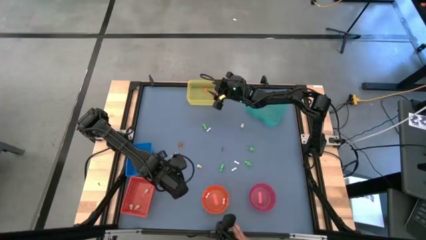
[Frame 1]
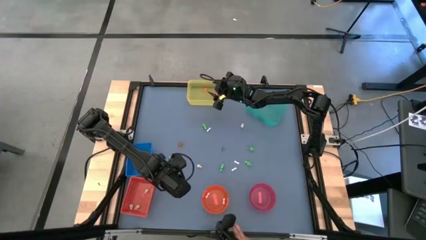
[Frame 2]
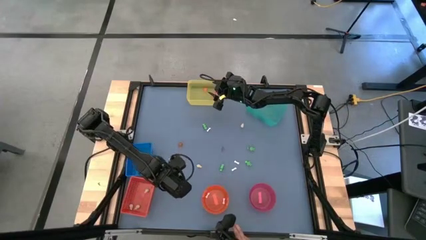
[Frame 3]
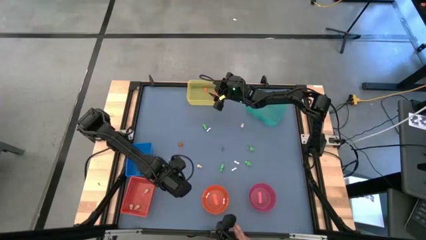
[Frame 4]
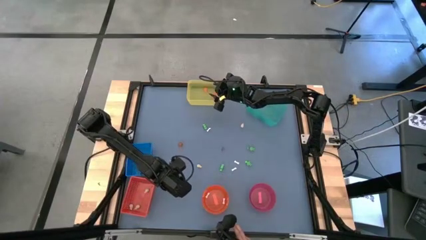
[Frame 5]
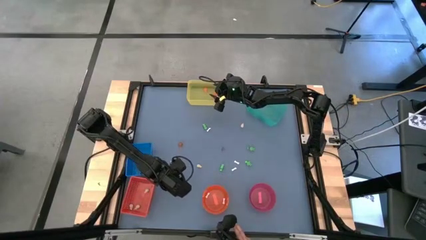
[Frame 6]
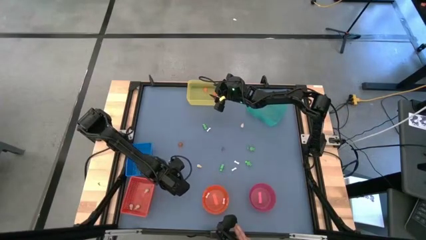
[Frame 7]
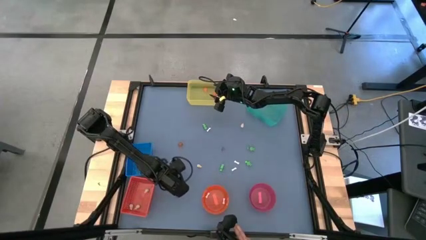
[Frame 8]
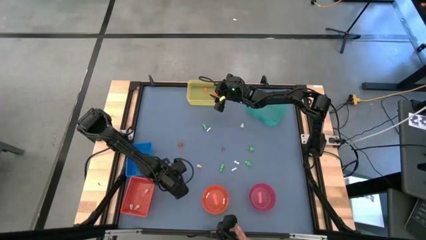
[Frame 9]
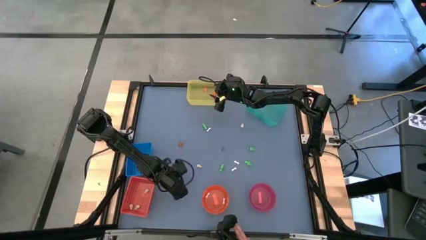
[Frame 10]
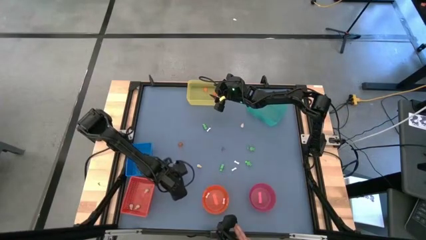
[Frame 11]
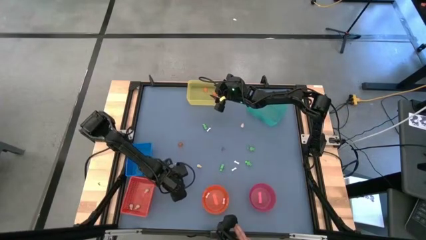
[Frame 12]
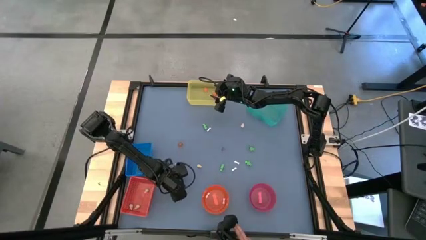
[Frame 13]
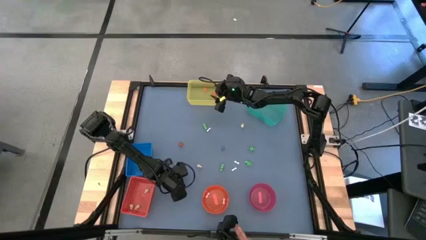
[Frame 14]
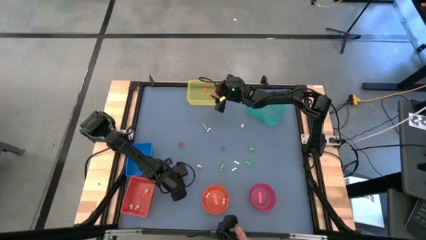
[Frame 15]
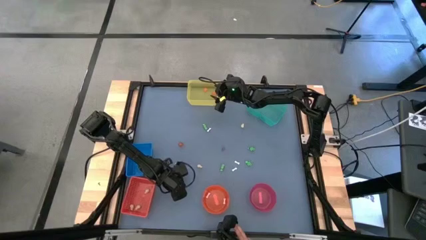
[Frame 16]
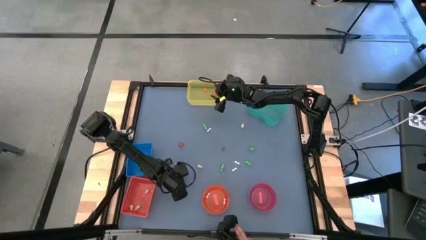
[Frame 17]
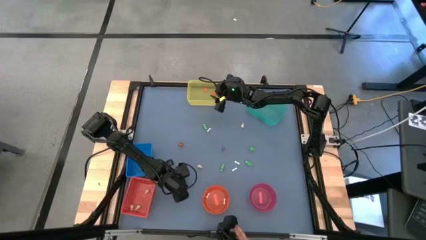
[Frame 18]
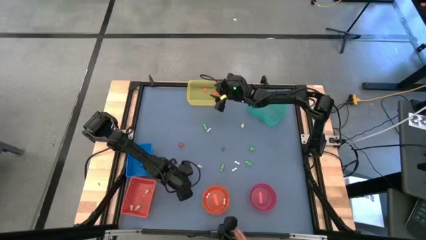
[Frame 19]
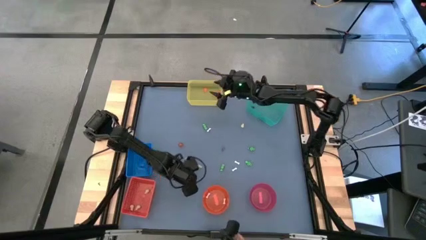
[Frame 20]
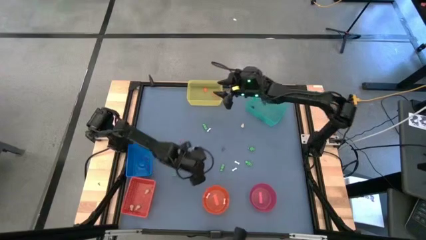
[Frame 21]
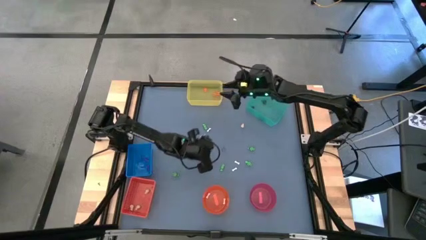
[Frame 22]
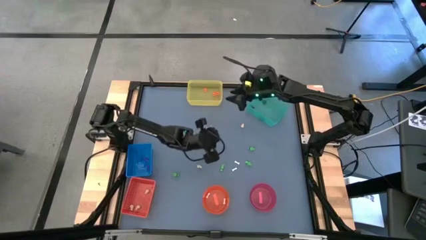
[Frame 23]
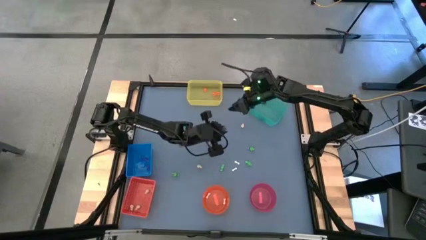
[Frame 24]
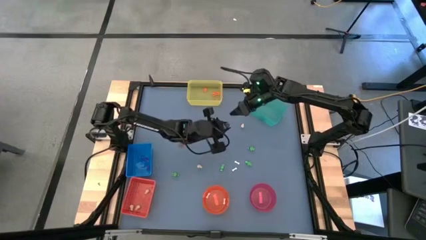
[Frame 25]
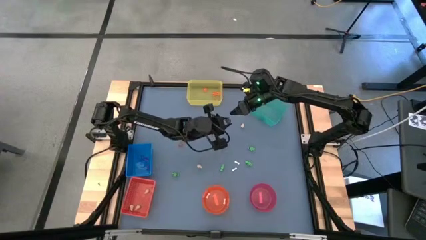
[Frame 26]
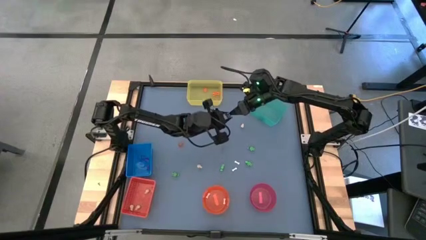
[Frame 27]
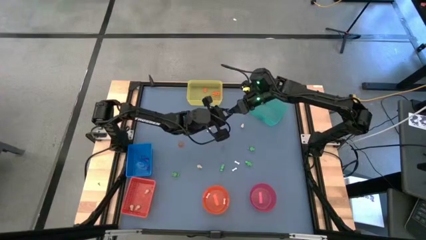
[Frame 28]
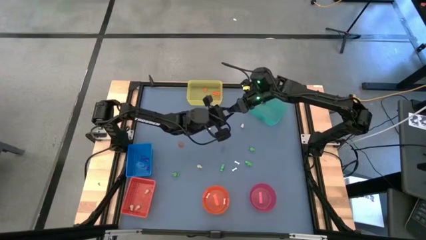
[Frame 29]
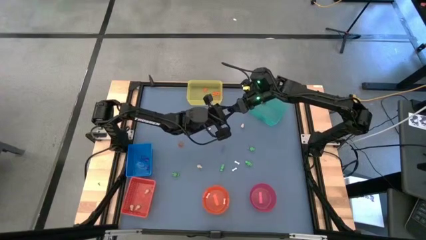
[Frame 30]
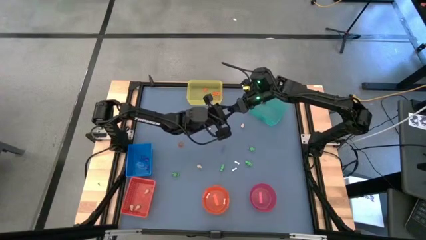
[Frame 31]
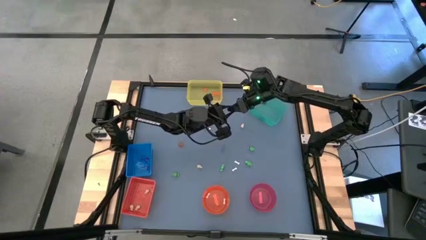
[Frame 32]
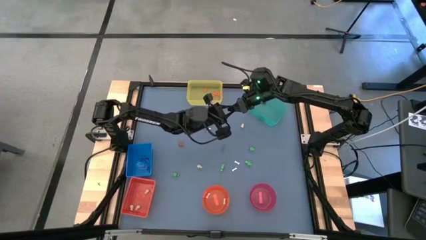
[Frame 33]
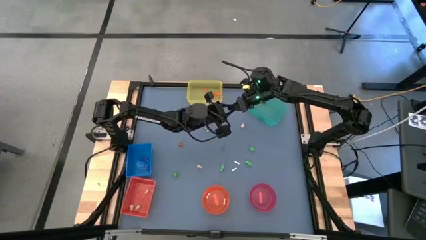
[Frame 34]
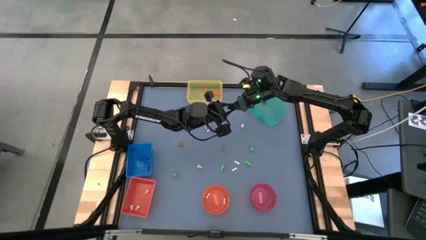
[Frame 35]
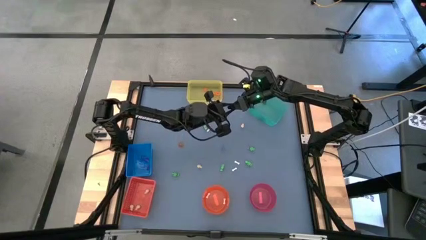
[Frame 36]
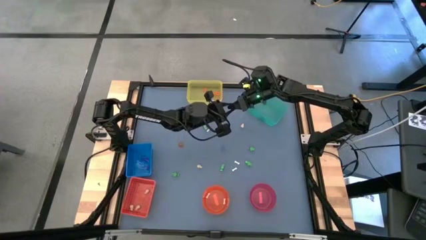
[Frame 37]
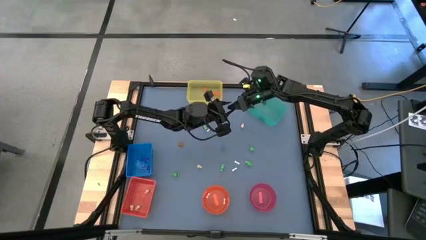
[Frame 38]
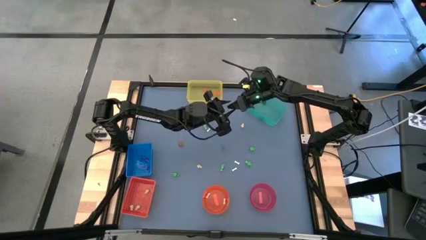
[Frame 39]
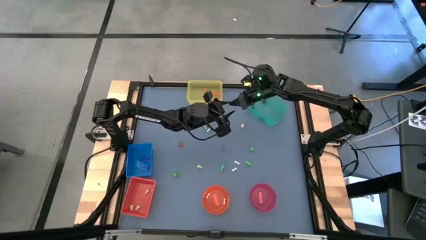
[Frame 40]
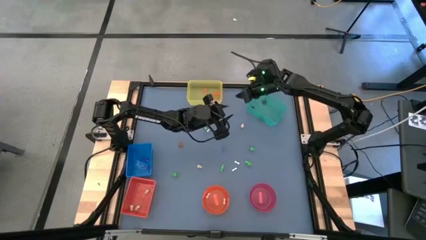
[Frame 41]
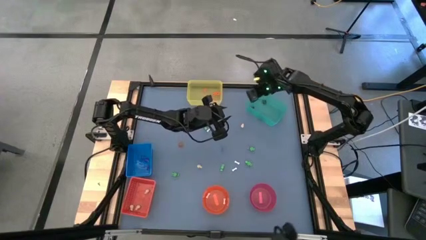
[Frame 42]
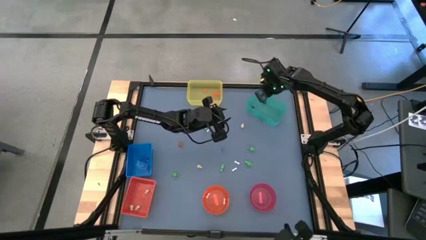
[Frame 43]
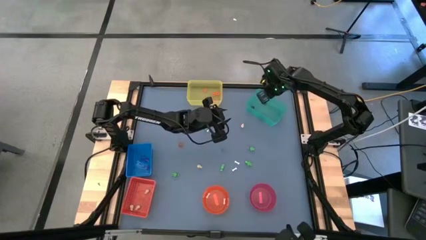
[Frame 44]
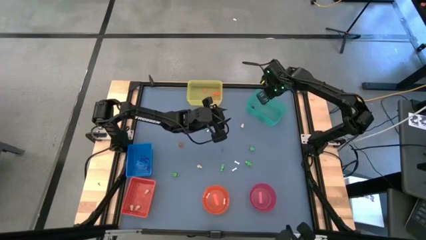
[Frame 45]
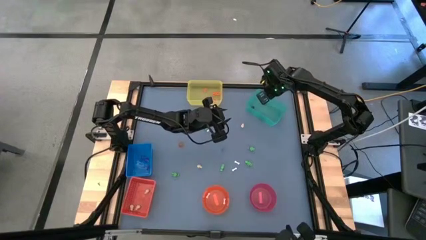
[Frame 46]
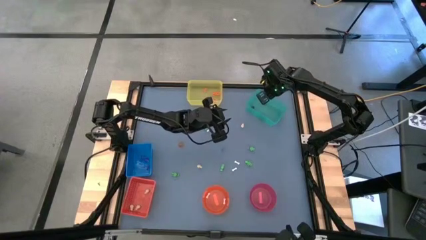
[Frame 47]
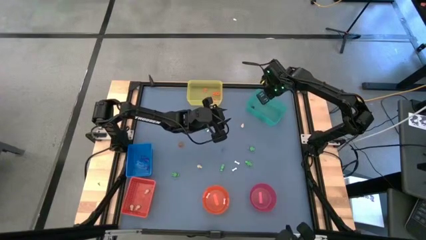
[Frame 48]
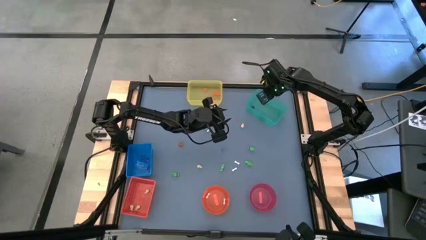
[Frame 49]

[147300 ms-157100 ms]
Task: Sort Halloween decoration
Put the black skull toy into the light blue bin

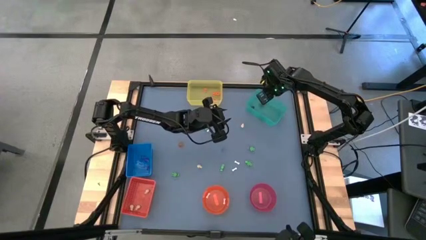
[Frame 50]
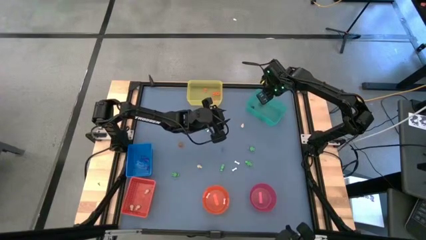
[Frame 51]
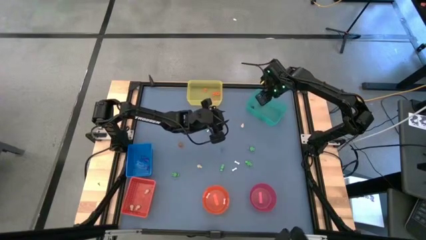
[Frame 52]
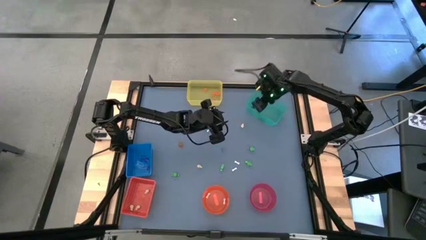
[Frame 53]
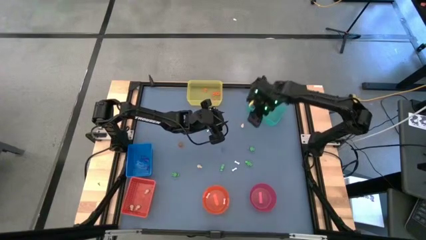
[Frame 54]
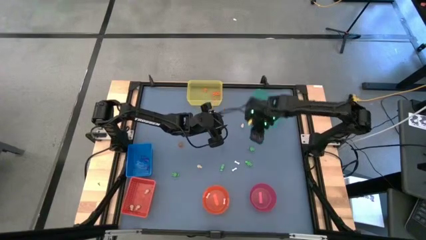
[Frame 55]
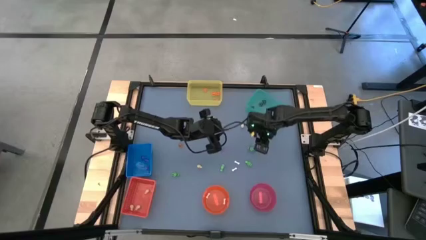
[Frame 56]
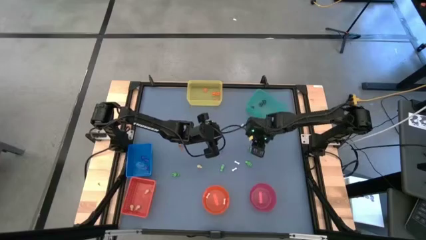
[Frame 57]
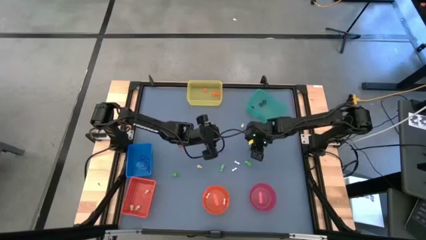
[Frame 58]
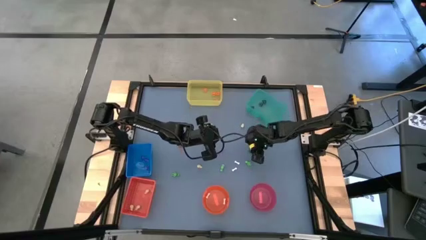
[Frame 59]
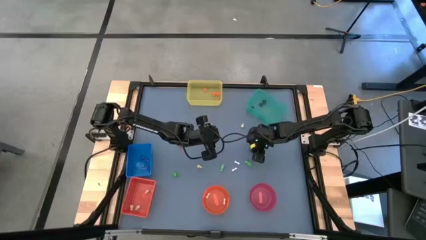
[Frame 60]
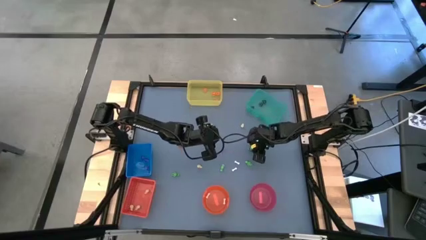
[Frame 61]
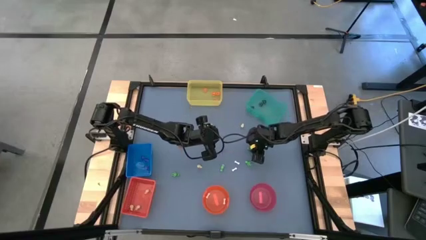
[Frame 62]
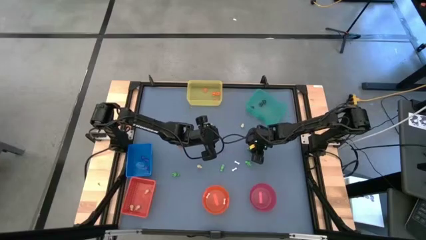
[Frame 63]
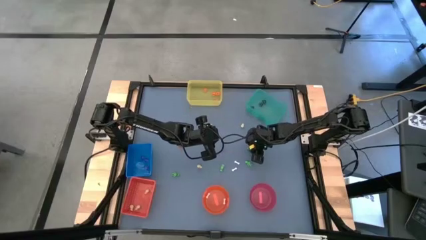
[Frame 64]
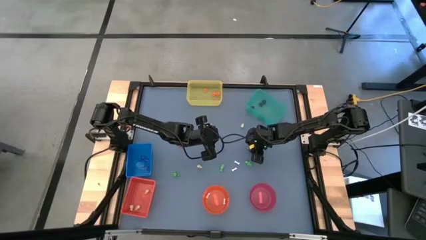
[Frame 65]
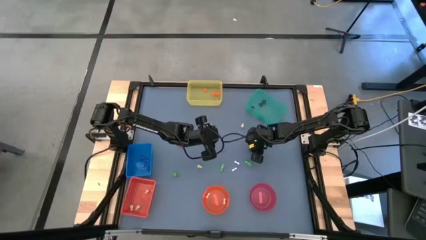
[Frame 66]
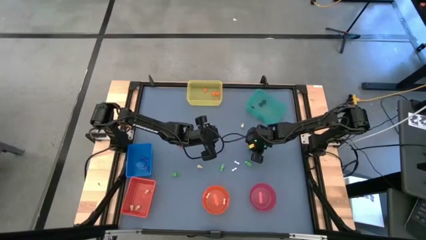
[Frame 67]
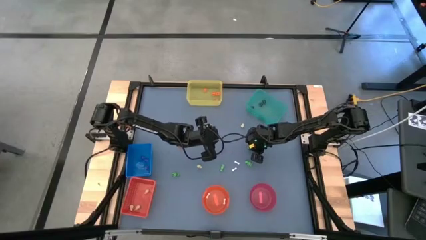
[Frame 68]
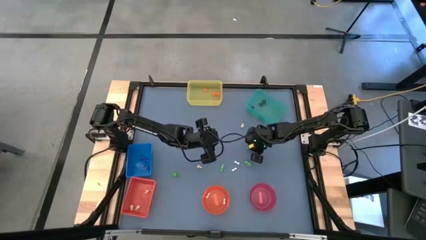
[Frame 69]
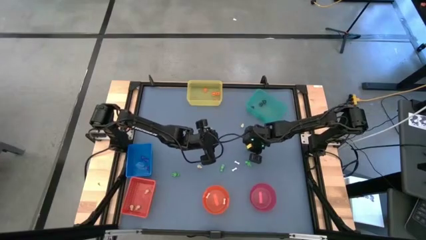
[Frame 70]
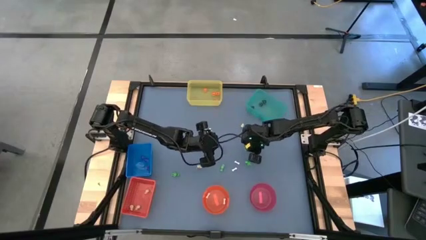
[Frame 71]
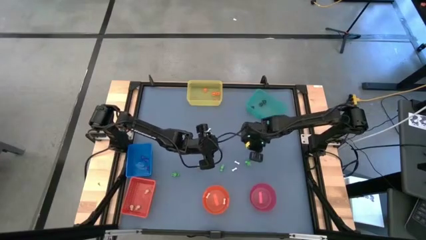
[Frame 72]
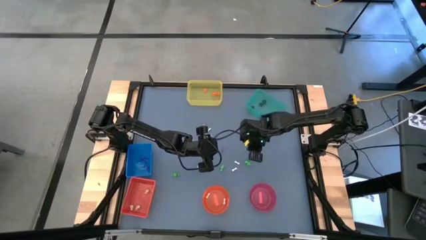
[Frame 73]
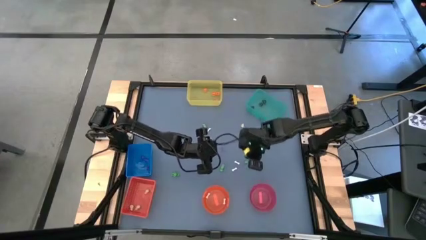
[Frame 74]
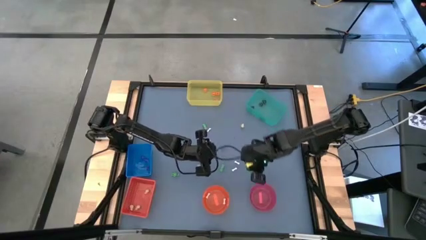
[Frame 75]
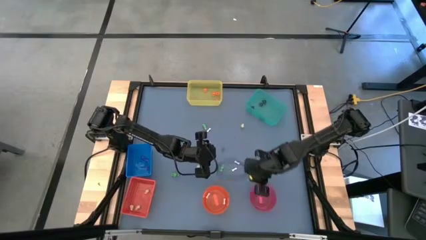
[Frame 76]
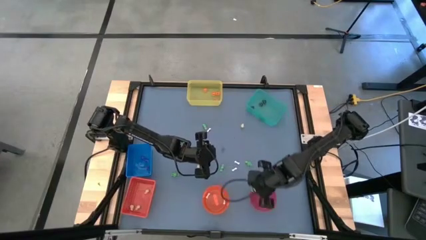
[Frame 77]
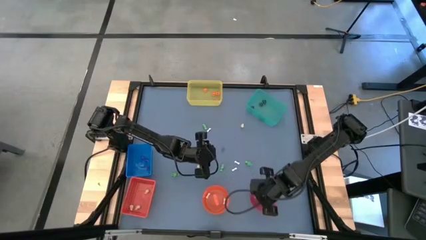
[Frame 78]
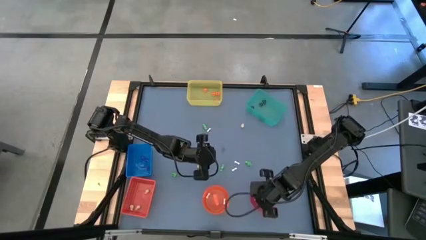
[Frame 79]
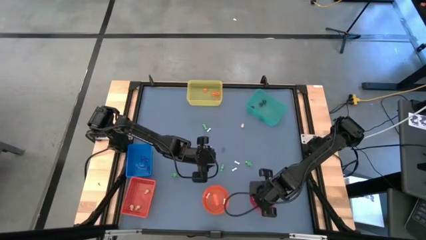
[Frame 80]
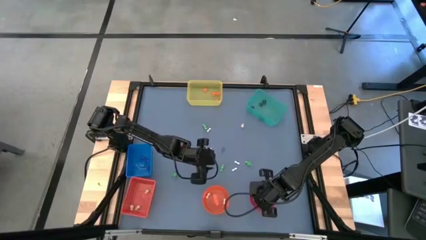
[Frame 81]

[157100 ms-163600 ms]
Put the green skeleton toy into the pink bowl
